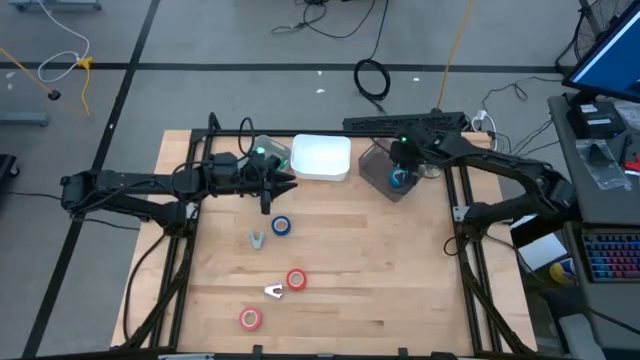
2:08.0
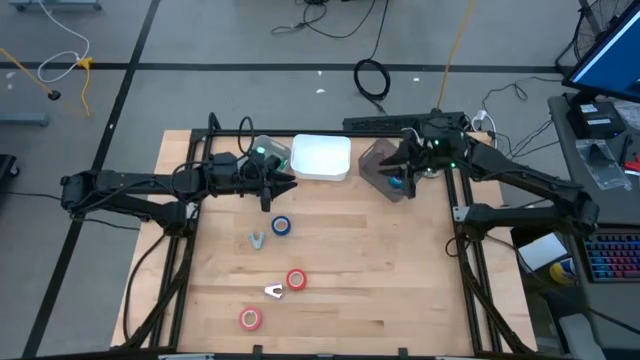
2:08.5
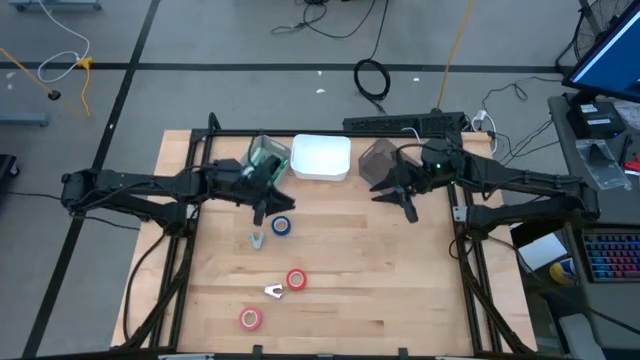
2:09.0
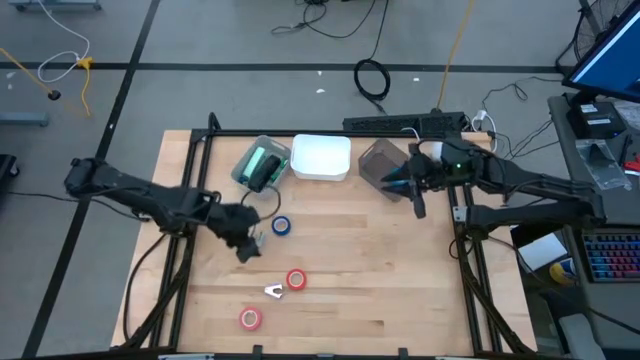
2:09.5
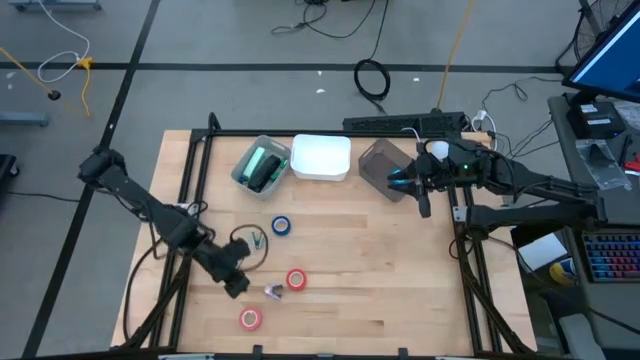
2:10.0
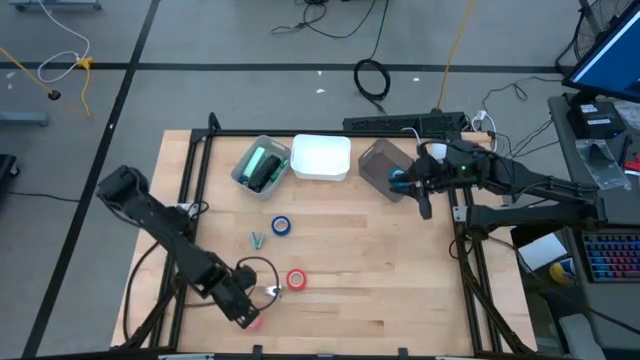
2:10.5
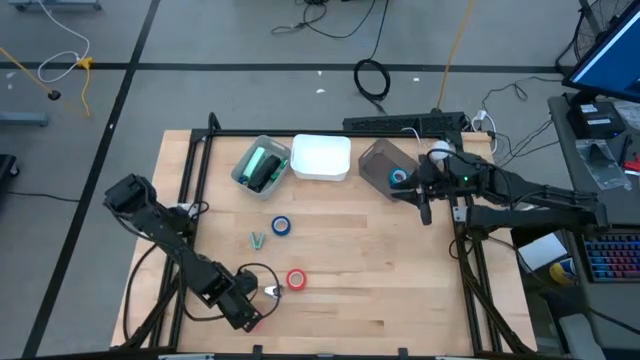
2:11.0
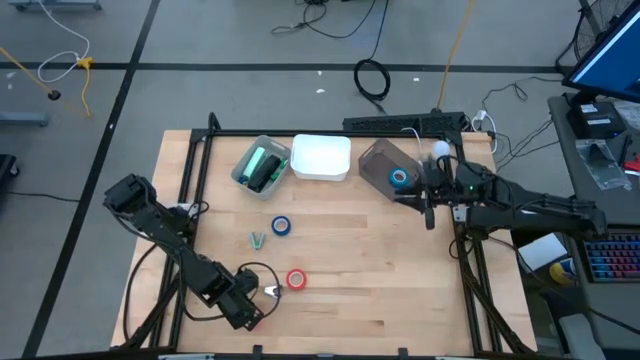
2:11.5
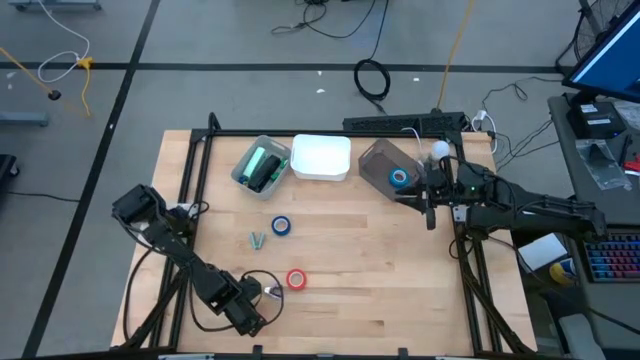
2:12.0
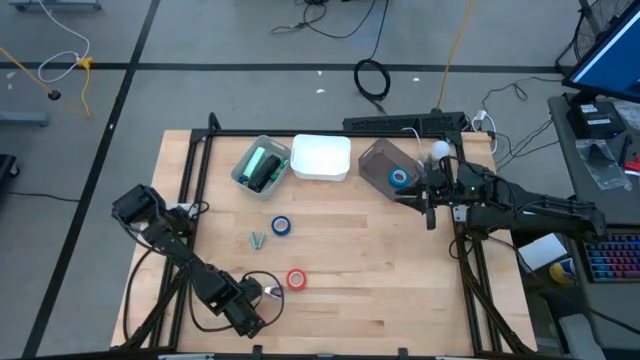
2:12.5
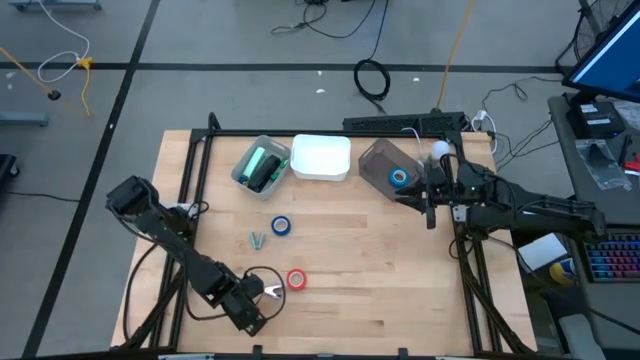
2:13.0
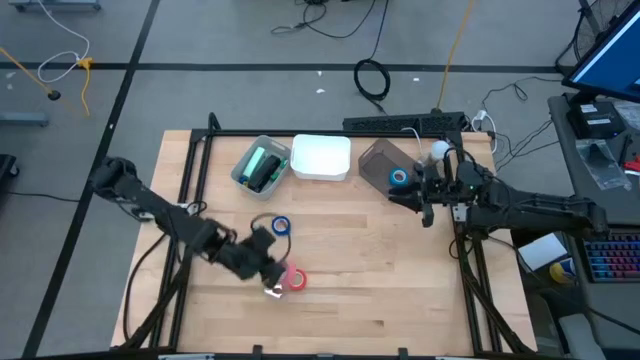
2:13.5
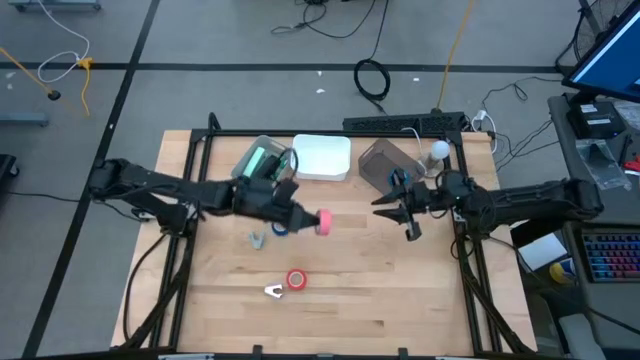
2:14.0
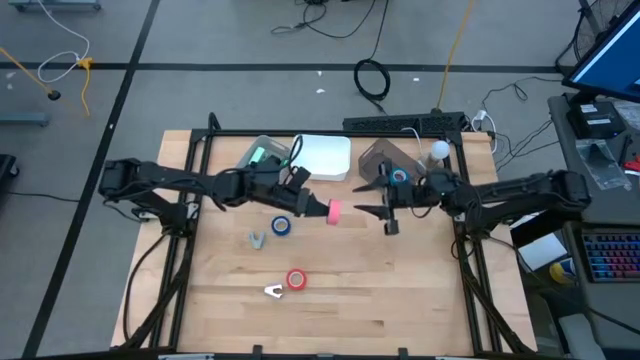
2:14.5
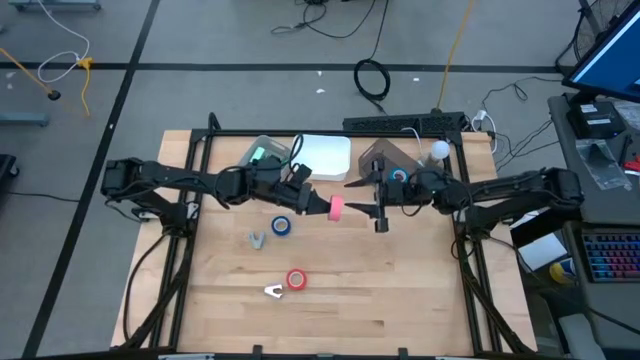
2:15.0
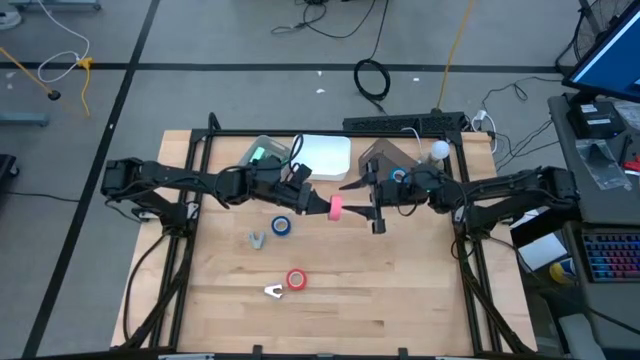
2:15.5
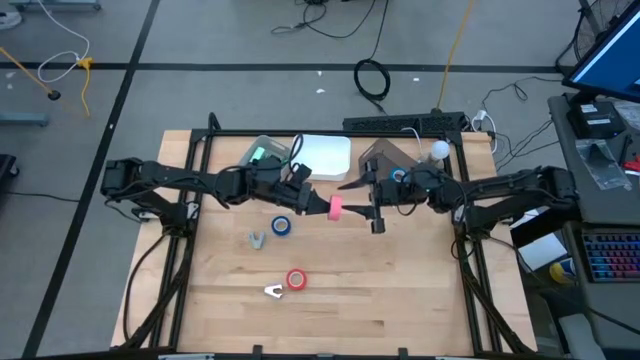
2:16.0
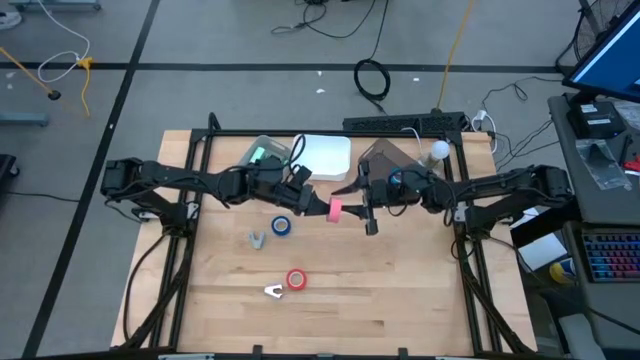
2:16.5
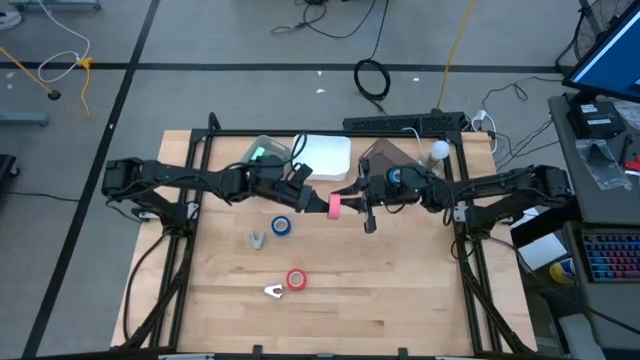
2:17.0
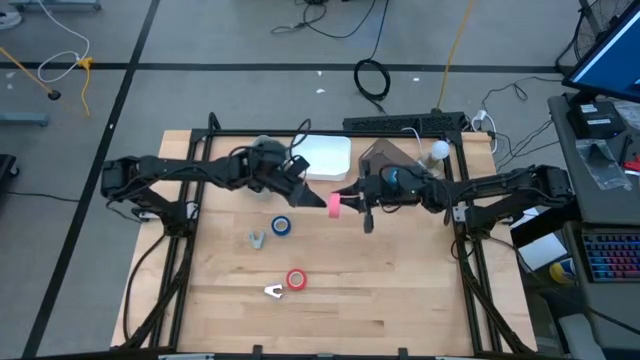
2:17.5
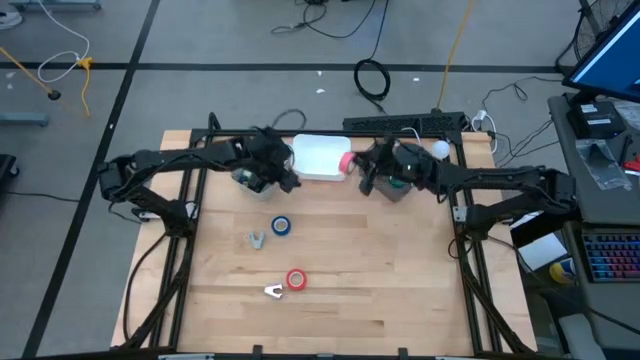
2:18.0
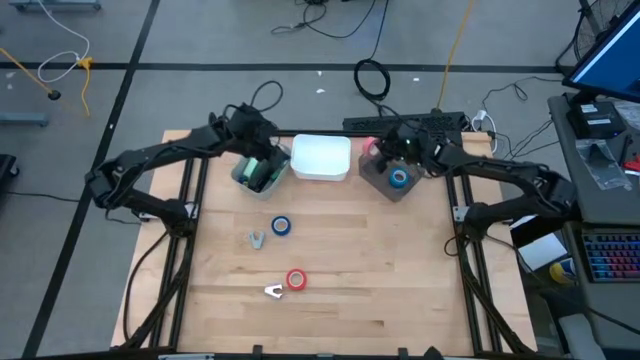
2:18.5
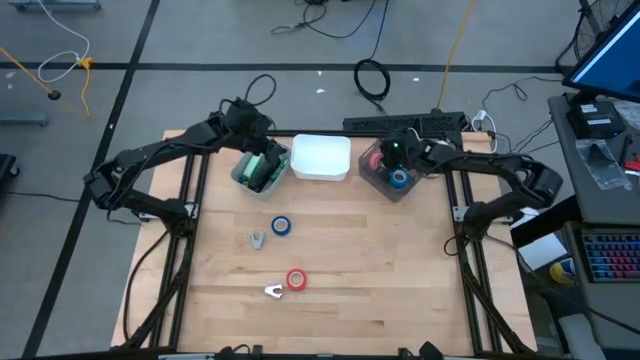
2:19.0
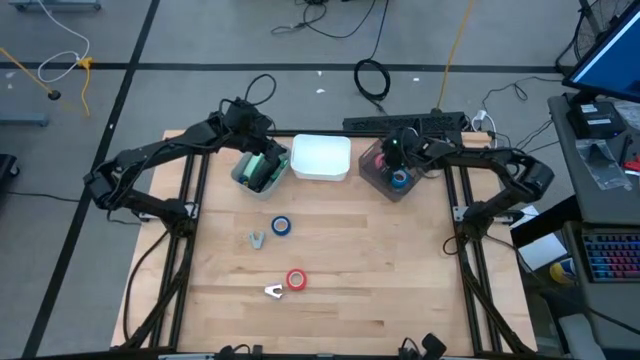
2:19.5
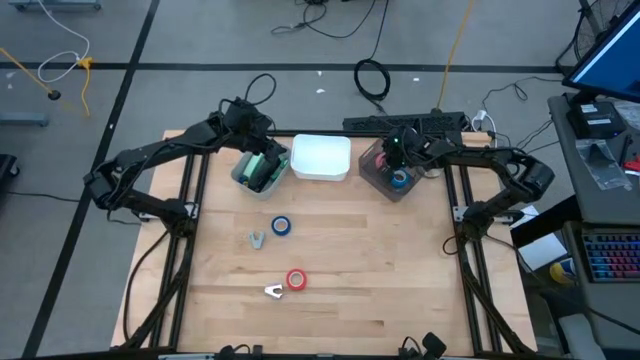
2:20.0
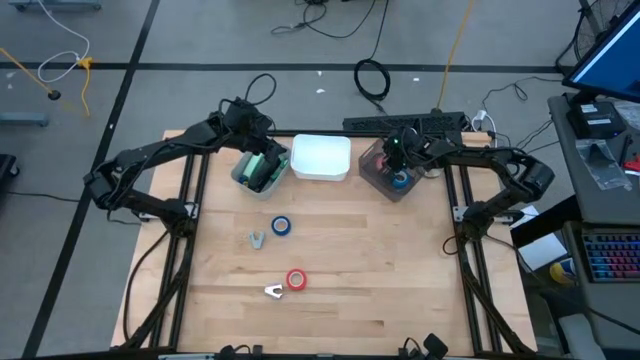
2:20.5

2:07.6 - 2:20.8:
Task: Pick and place Stapler, Stapler remover, tape
Put the pink tape into the black bin

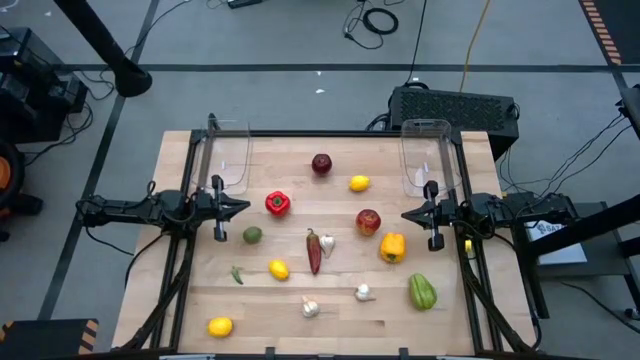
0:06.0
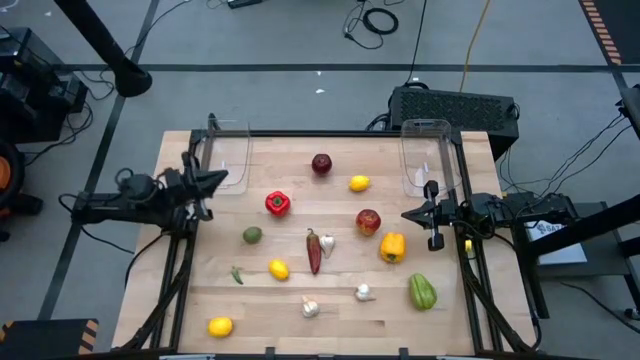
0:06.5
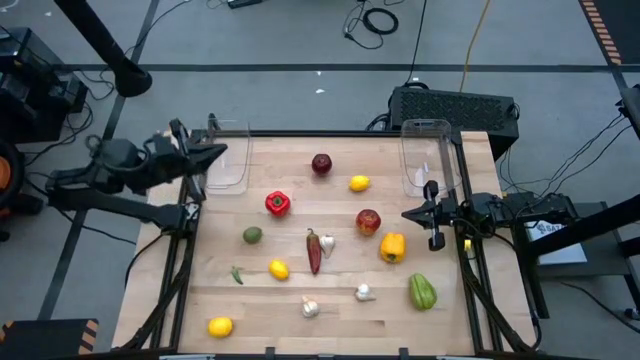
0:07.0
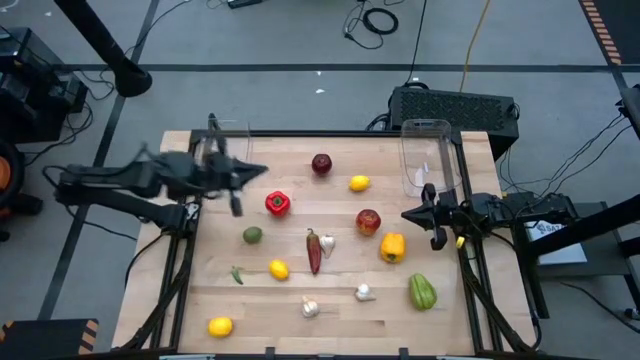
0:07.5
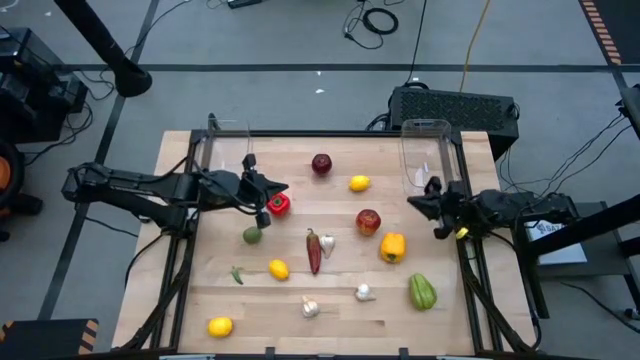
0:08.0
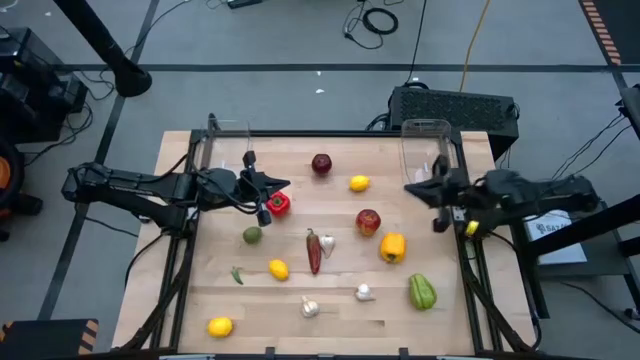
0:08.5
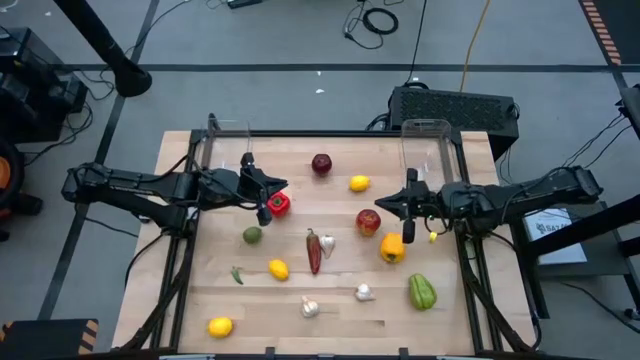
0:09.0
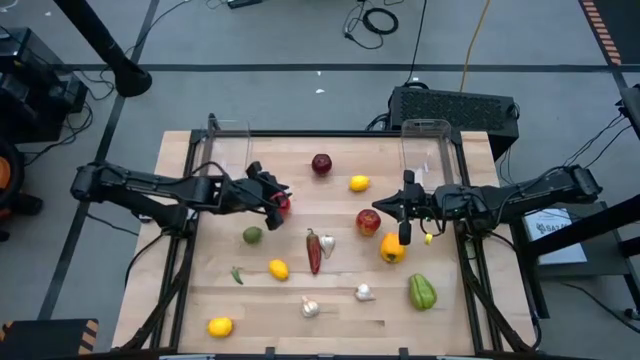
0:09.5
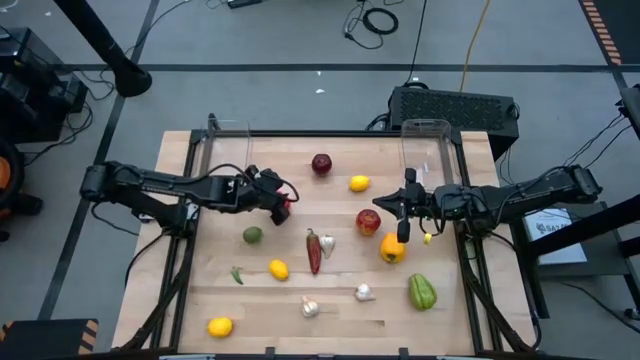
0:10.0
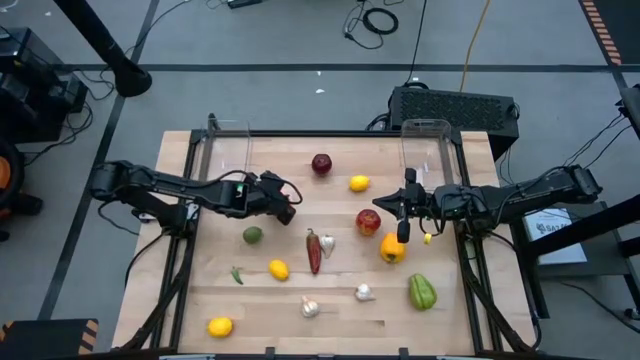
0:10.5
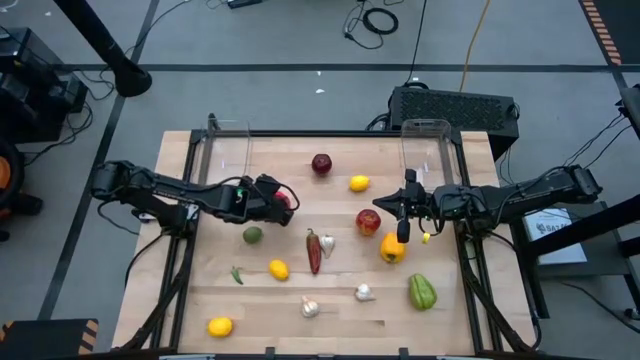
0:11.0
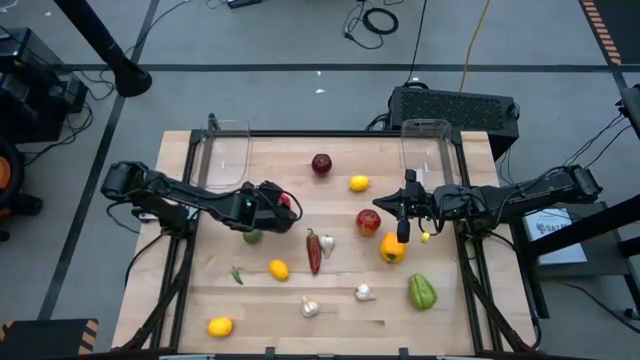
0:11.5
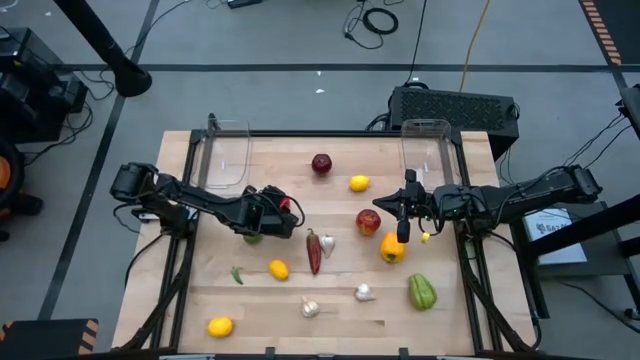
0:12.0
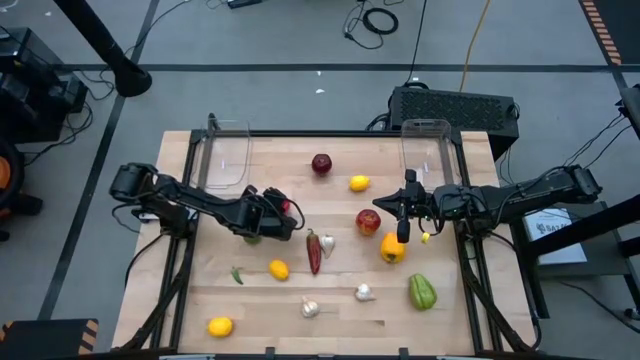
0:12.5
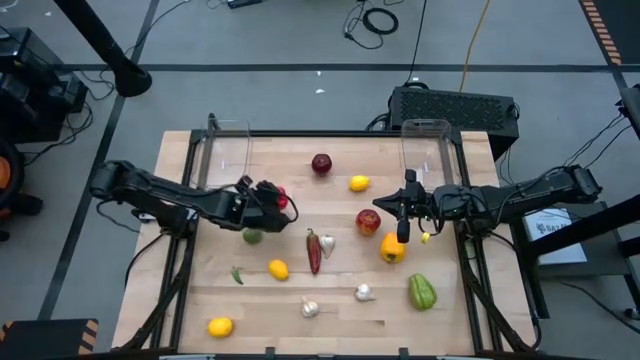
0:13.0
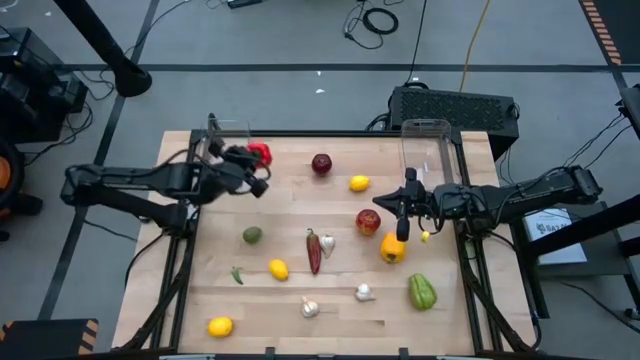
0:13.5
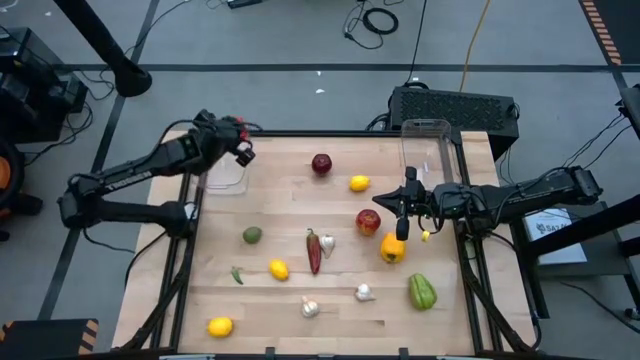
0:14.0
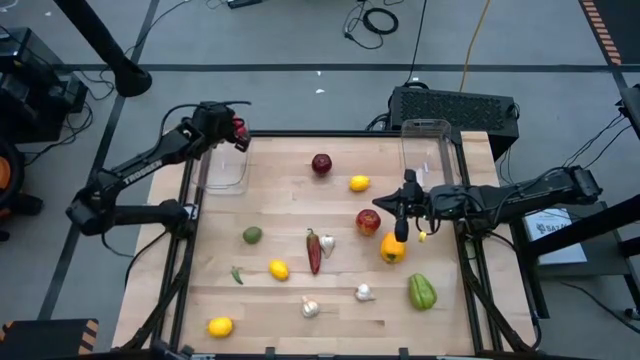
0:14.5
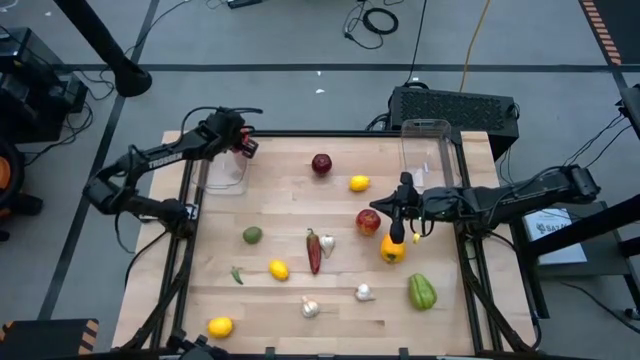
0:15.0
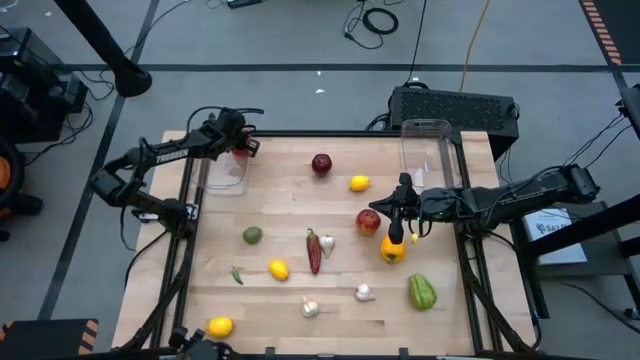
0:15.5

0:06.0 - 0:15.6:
Task: Sort produce into baskets
Put the red bell pepper into the left transparent bin
